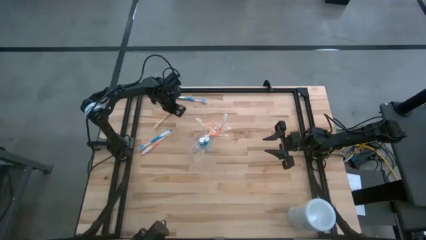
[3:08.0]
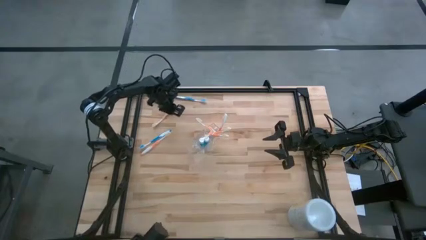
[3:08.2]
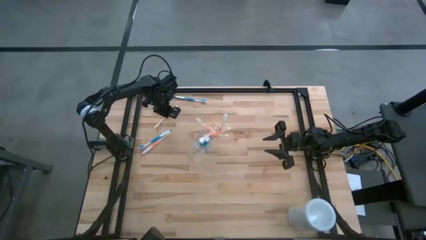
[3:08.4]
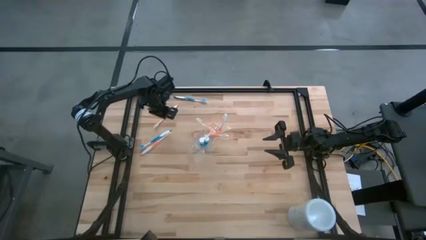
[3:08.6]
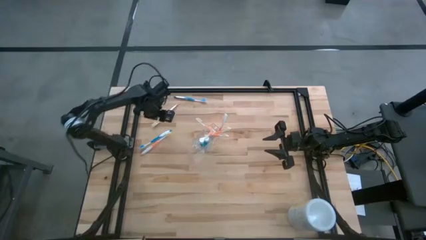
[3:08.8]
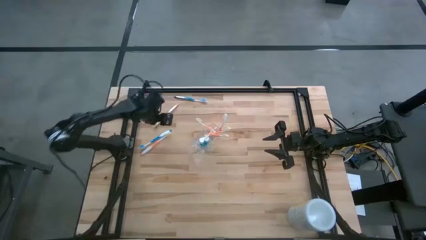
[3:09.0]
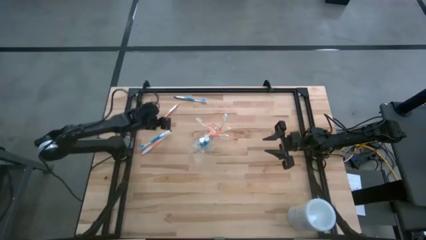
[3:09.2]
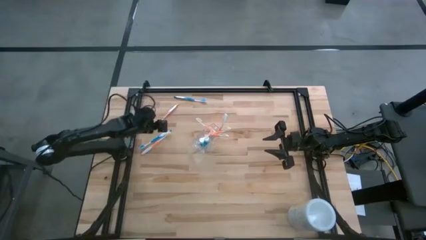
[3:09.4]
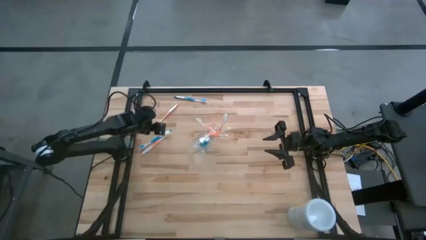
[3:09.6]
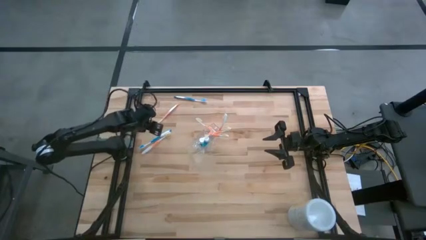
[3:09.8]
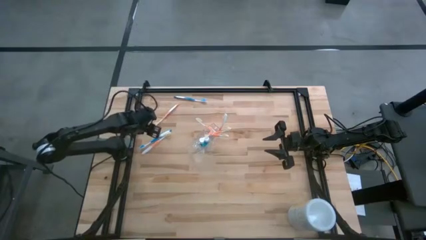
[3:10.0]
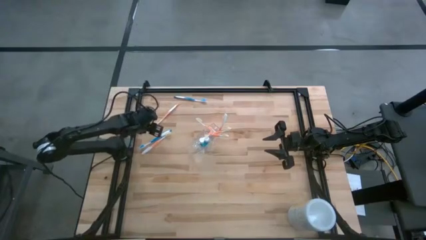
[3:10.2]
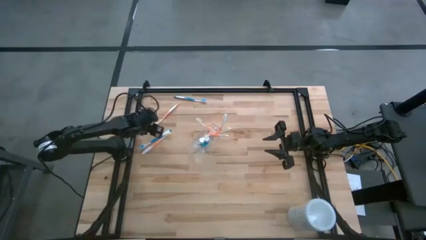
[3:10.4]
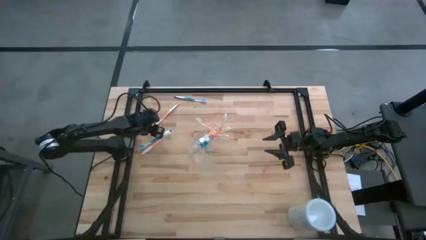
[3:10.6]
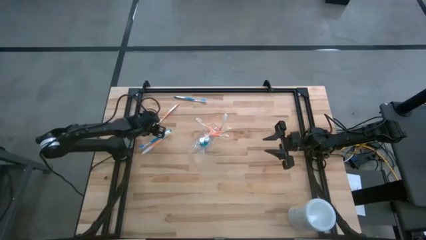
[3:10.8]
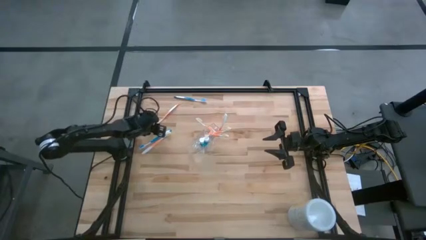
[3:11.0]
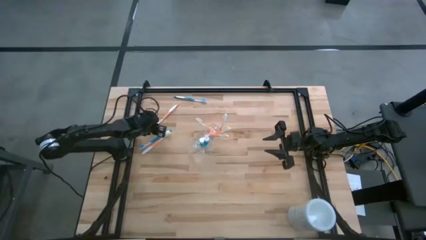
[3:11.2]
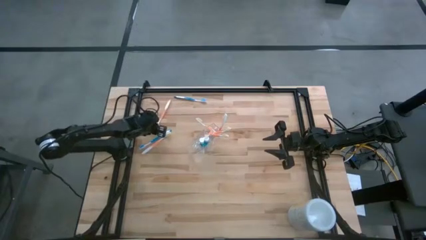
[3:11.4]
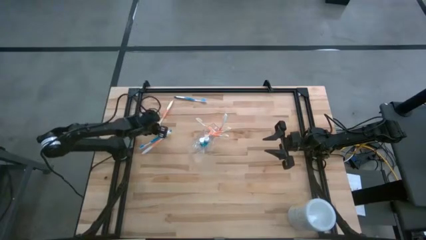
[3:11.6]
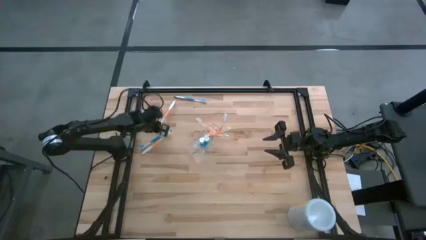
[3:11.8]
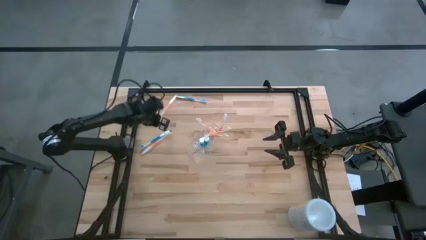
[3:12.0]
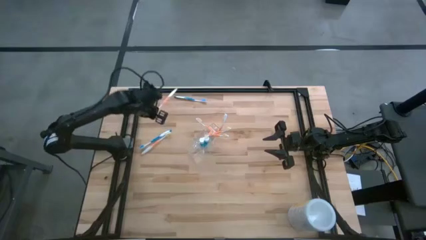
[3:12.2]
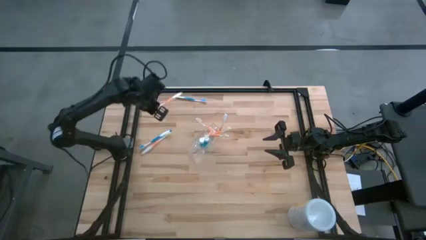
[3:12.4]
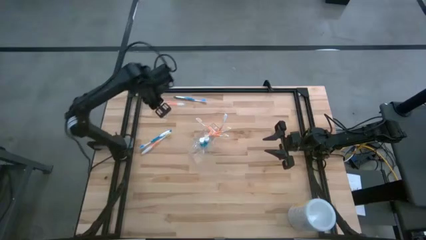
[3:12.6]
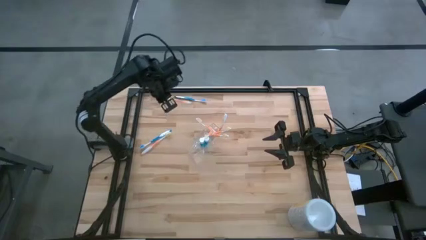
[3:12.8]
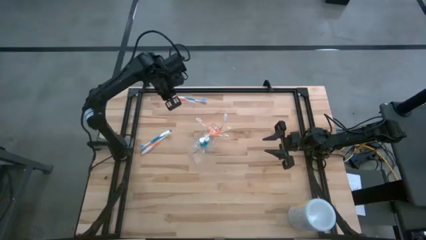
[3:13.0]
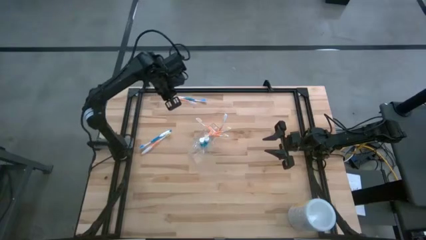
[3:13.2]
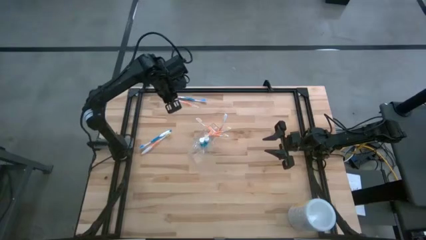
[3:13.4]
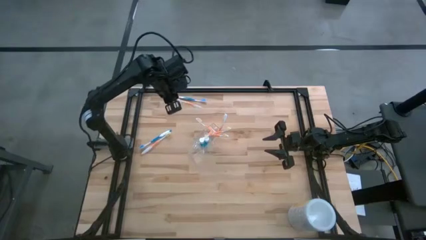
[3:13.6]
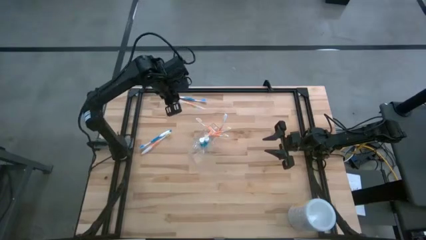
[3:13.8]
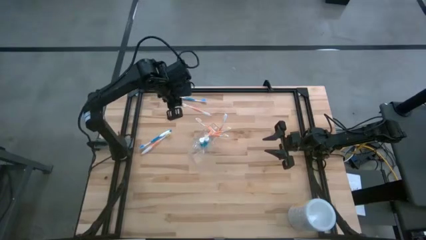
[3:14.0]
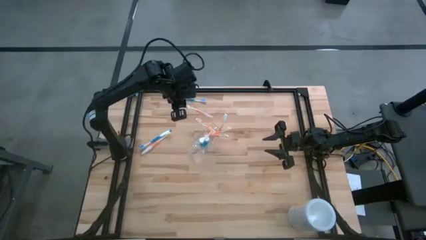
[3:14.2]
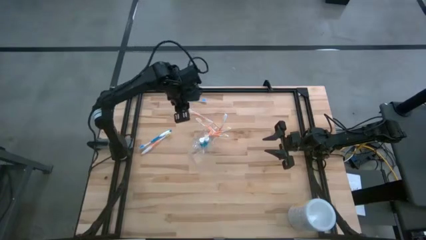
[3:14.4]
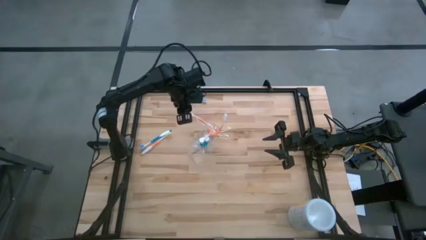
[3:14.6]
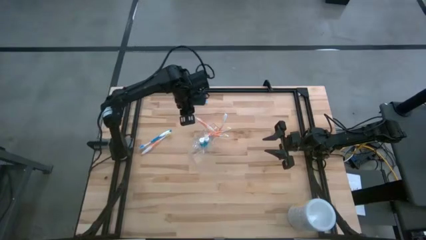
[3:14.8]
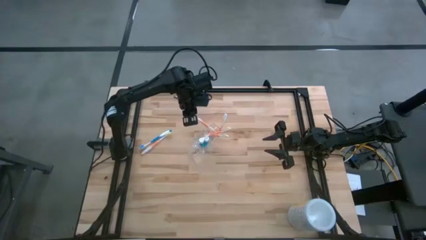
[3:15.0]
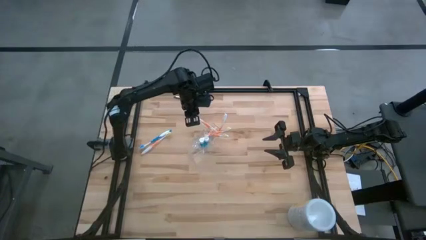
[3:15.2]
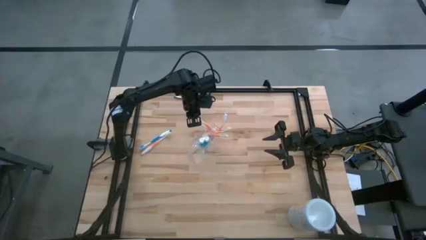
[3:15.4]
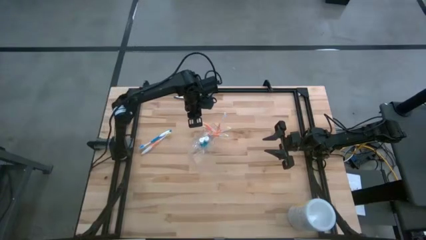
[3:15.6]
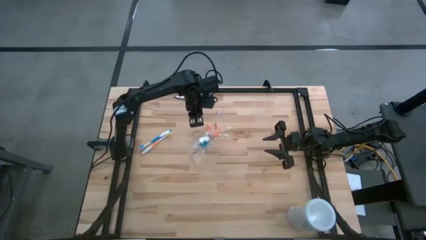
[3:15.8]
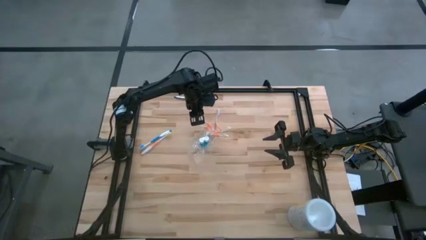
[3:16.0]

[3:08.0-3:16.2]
Task: Pick & Place toothbrushing station
Put the orange toothbrush into the transparent

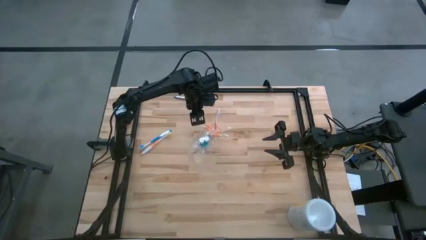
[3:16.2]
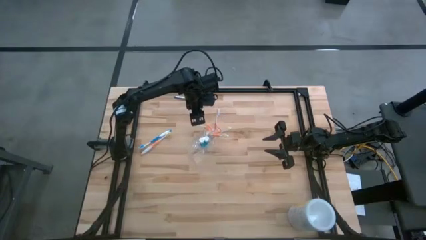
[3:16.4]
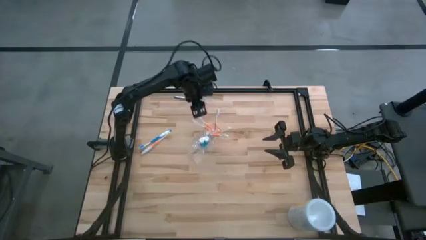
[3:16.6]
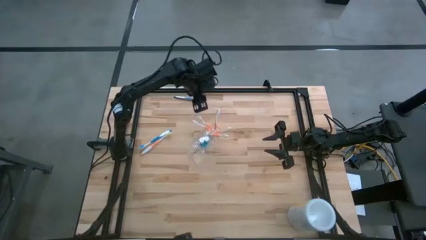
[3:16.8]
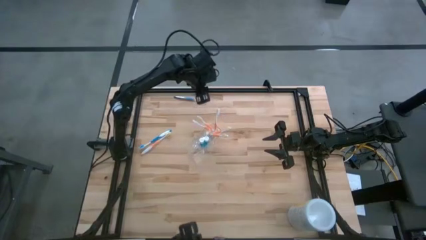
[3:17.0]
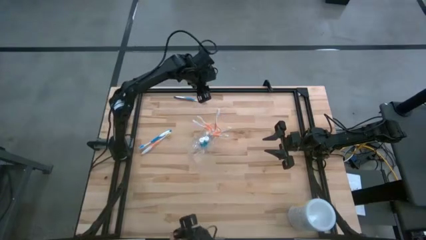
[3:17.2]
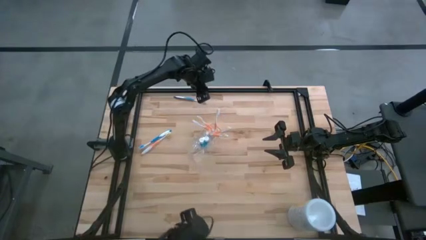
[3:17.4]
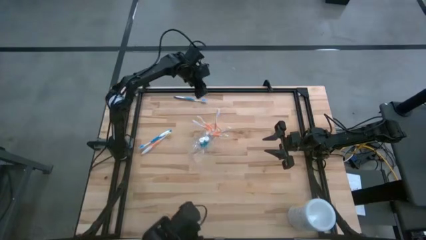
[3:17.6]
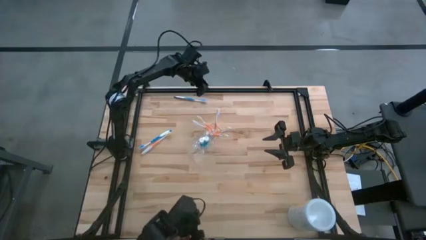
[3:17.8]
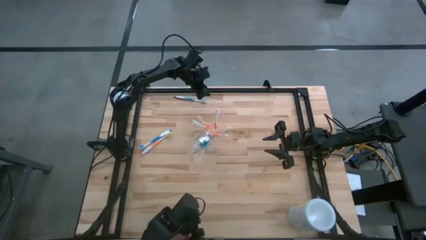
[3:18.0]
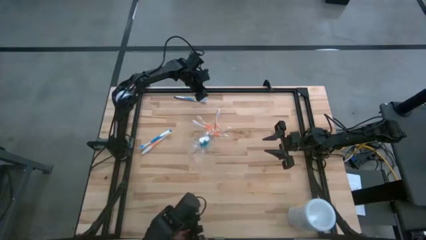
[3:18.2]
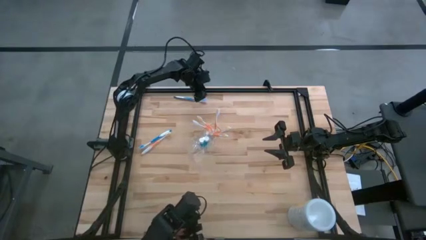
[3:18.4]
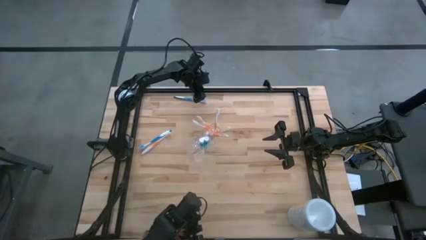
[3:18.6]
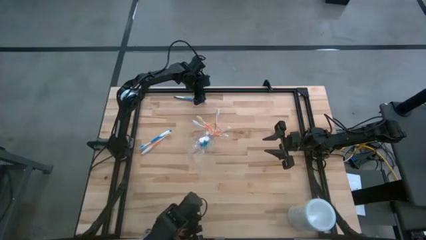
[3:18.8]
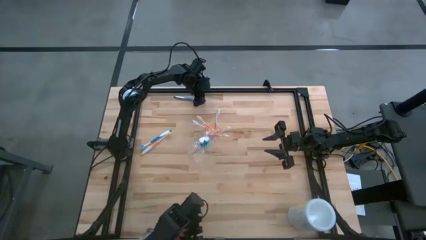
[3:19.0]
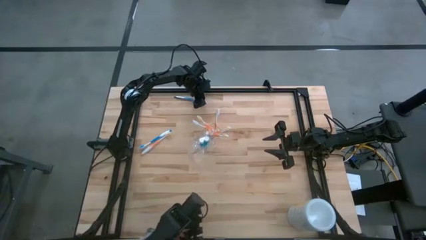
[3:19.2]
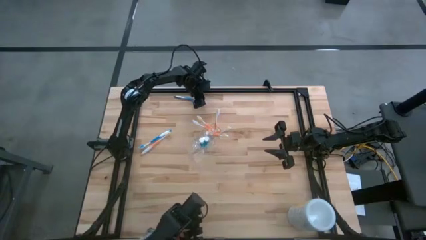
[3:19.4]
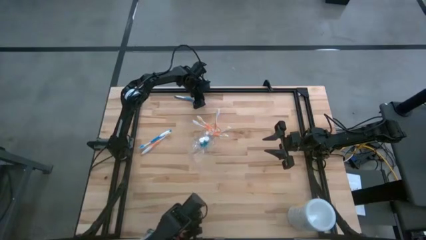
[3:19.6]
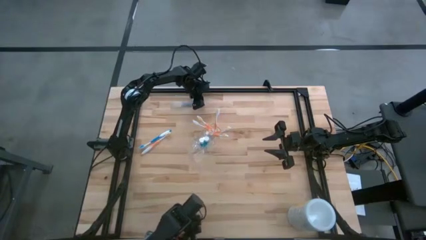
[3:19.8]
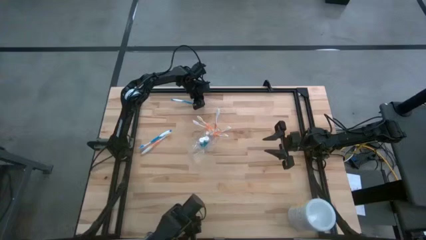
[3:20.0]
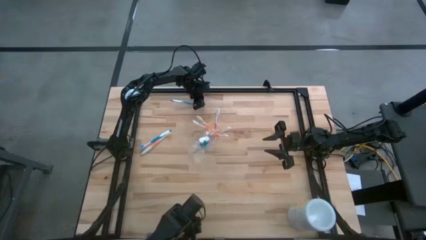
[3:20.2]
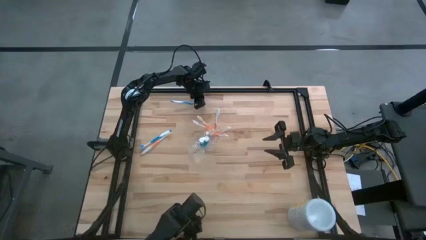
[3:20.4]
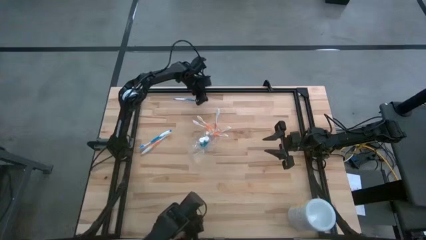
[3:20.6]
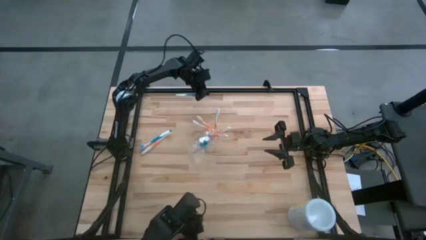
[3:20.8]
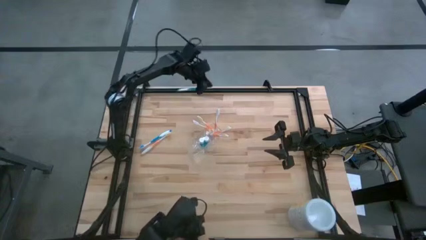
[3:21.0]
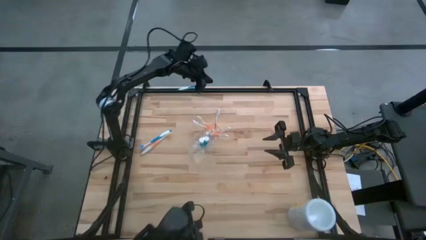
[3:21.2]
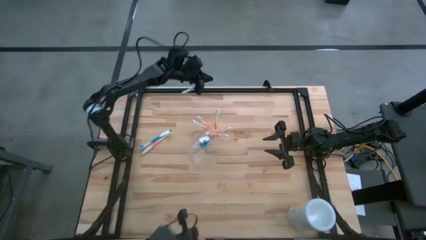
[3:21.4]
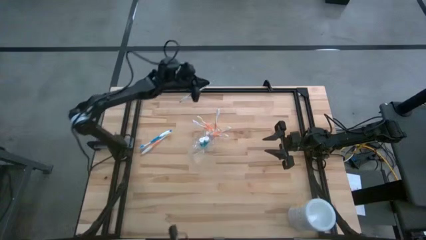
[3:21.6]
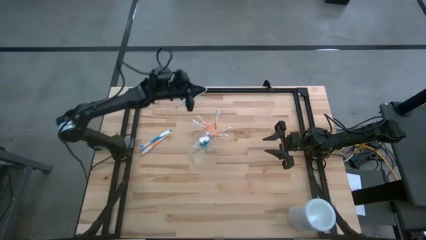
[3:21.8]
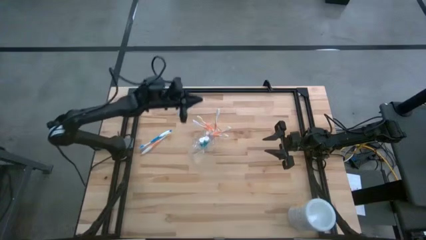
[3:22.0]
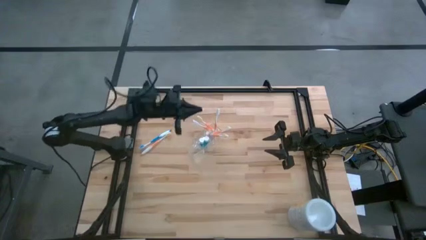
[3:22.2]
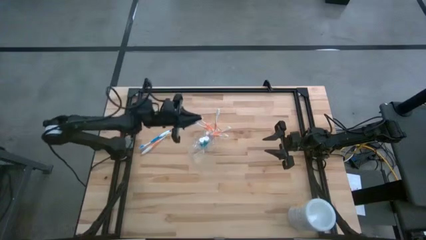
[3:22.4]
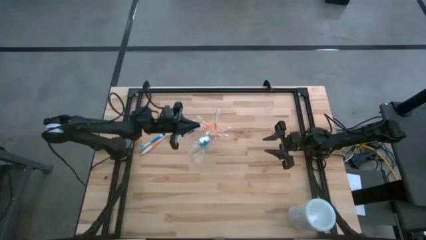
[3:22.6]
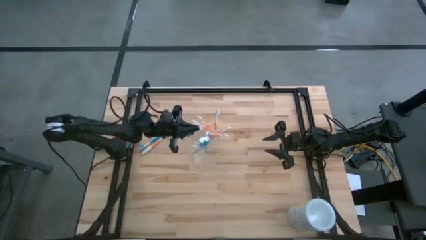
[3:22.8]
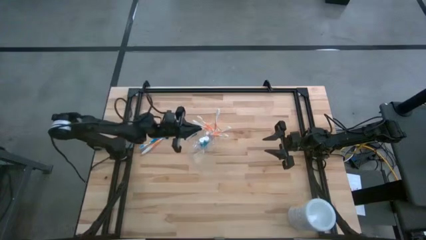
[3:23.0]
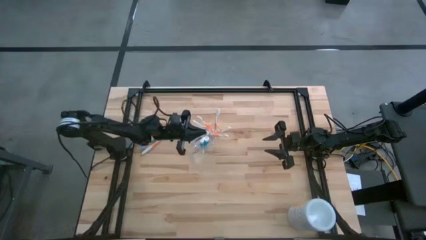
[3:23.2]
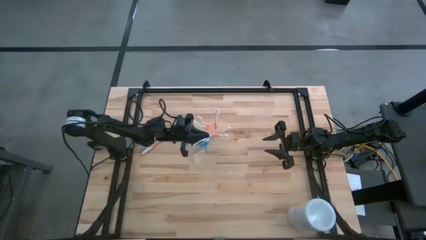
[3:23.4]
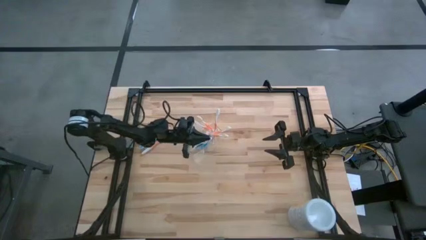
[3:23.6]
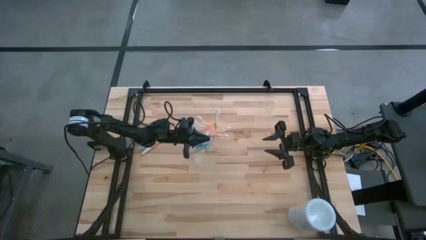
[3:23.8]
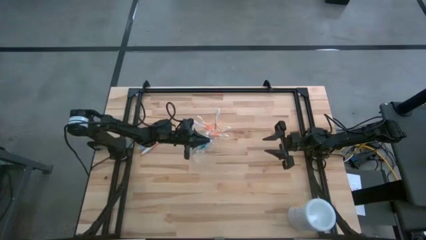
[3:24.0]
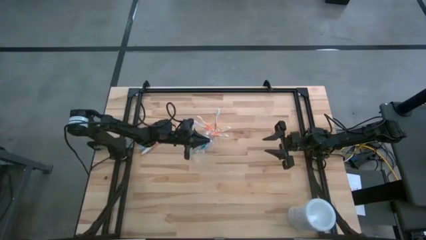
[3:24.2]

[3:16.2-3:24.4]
Put the blue toothbrush into the transparent organizer

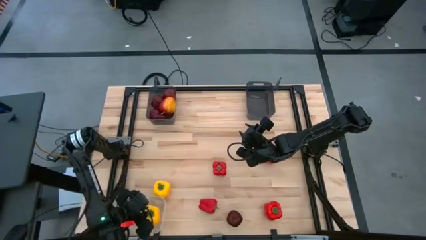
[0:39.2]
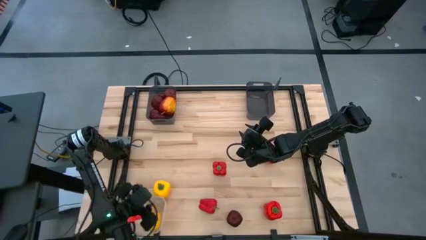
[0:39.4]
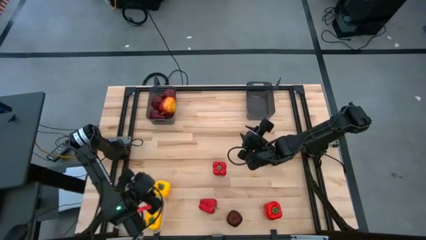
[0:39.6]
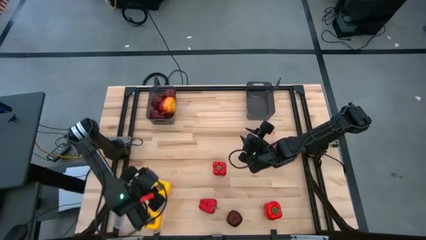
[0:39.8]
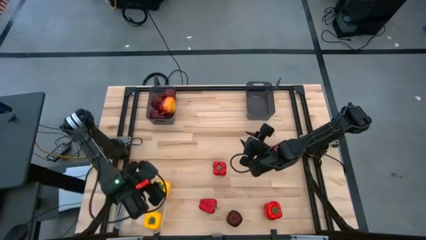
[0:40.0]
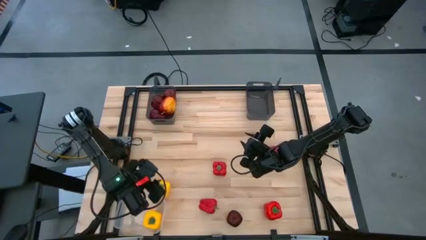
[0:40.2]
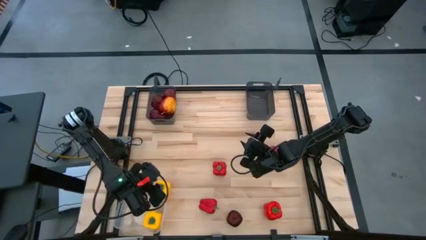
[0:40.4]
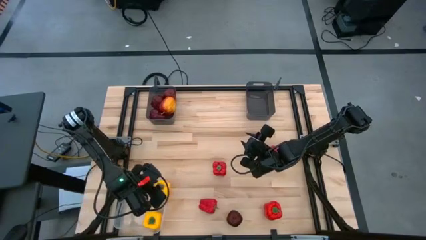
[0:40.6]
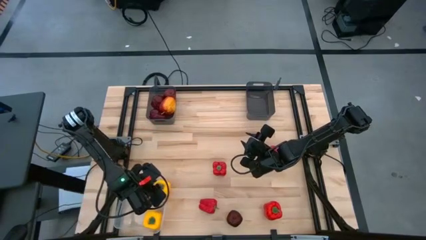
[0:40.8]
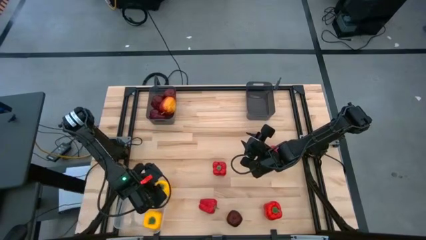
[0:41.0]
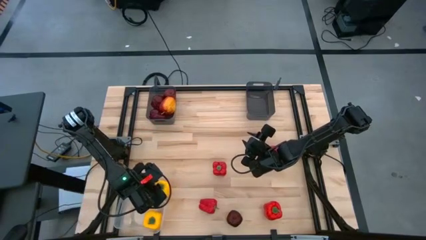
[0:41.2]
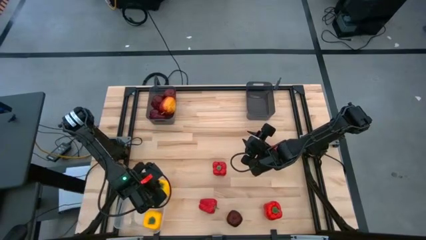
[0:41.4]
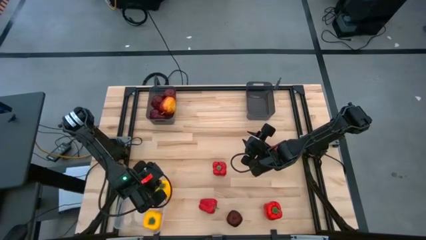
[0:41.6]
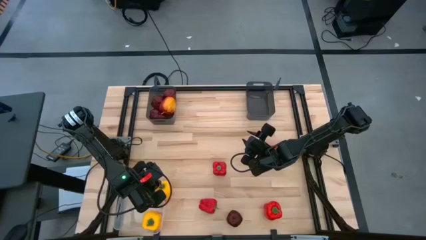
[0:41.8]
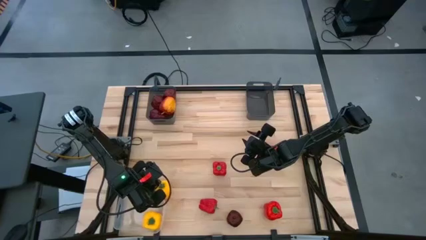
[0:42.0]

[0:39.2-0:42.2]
Task: Sort produce into baskets
Put the yellow bell pepper into the transparent bin
